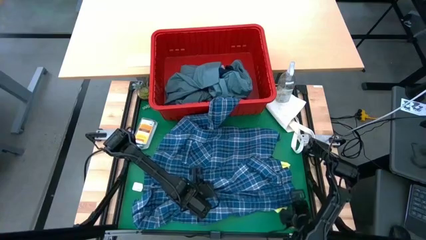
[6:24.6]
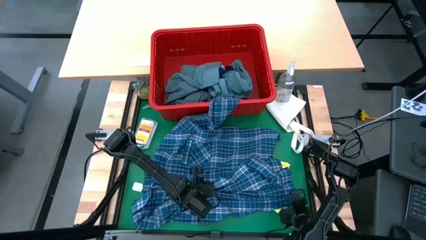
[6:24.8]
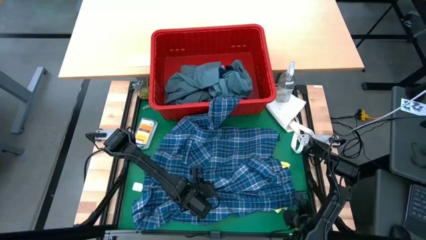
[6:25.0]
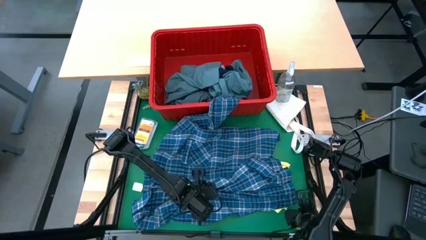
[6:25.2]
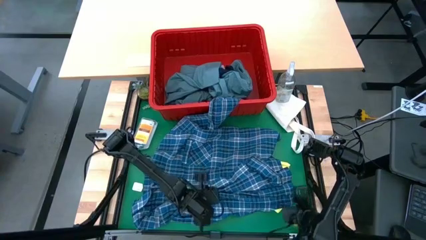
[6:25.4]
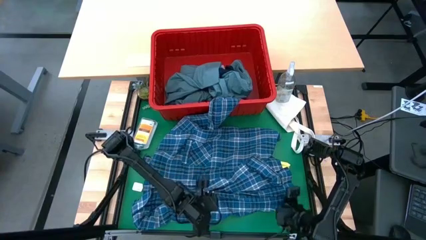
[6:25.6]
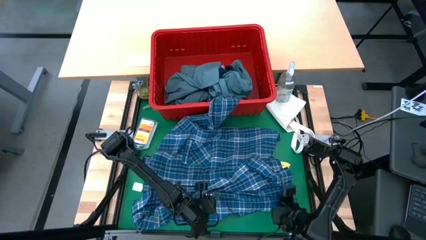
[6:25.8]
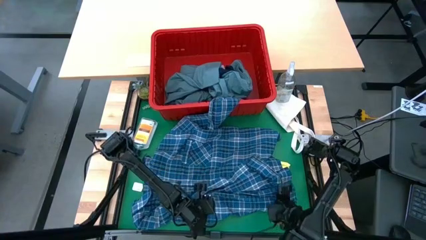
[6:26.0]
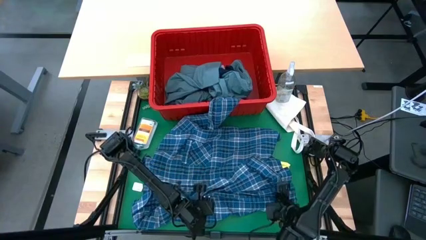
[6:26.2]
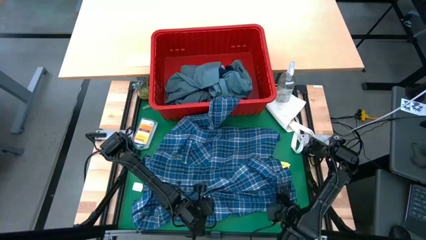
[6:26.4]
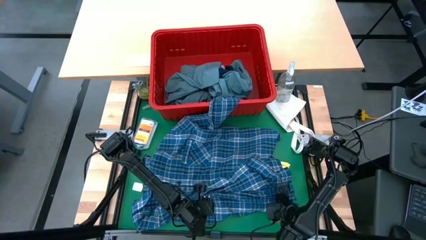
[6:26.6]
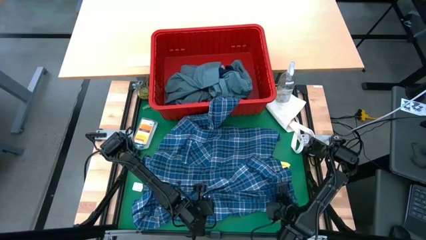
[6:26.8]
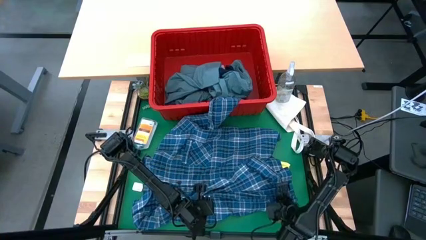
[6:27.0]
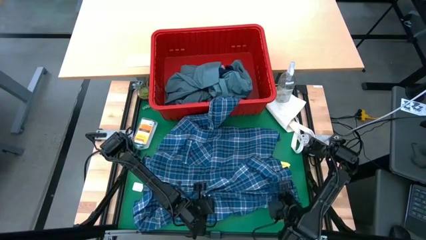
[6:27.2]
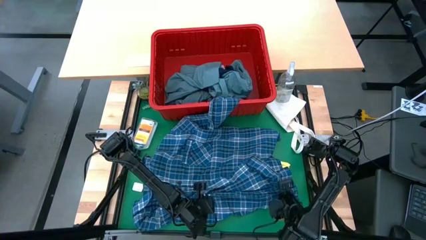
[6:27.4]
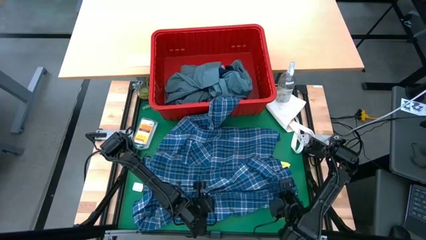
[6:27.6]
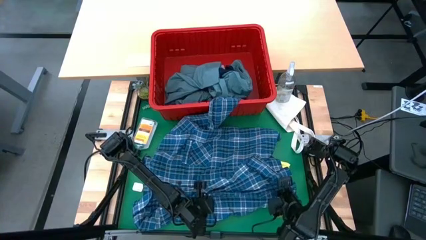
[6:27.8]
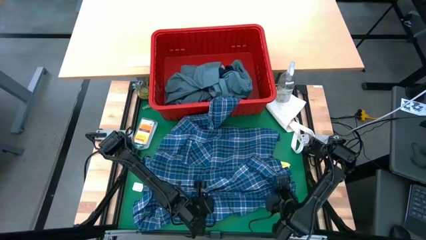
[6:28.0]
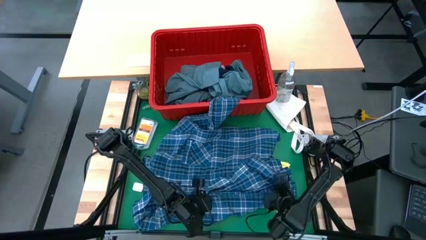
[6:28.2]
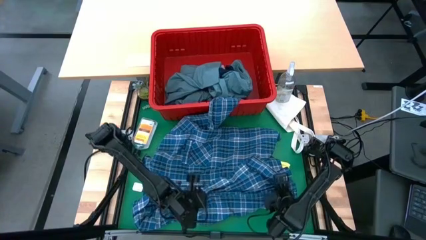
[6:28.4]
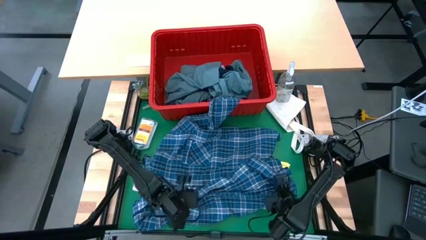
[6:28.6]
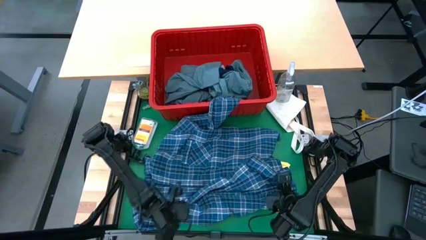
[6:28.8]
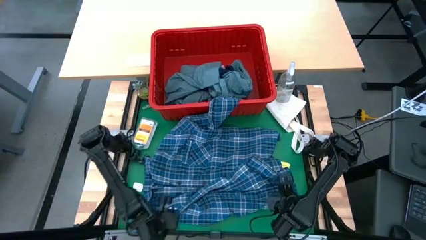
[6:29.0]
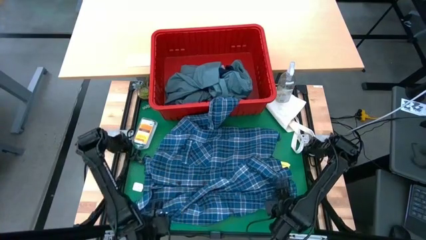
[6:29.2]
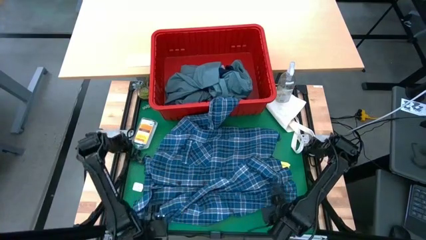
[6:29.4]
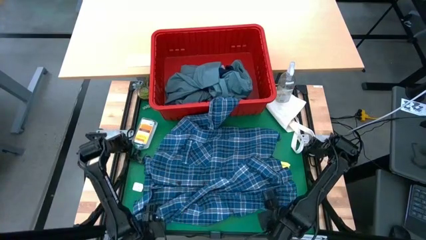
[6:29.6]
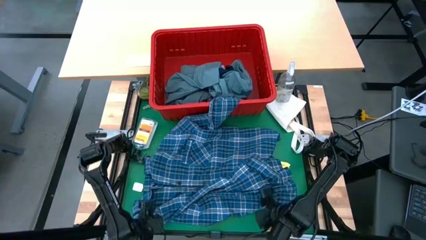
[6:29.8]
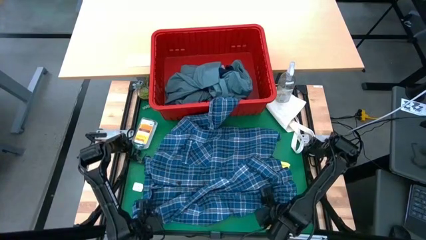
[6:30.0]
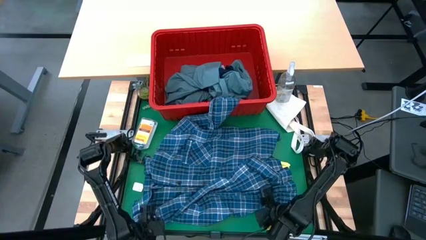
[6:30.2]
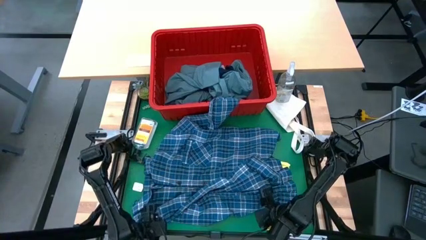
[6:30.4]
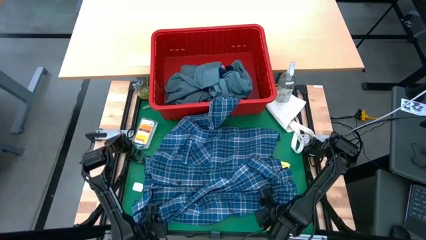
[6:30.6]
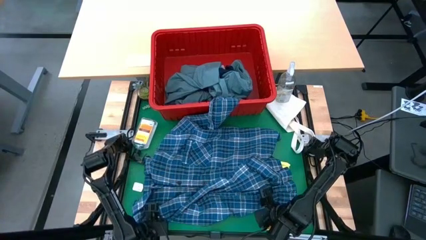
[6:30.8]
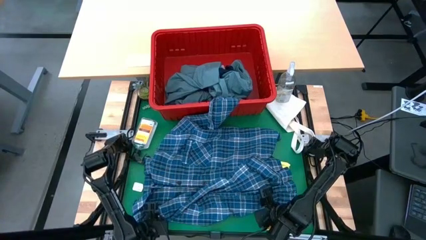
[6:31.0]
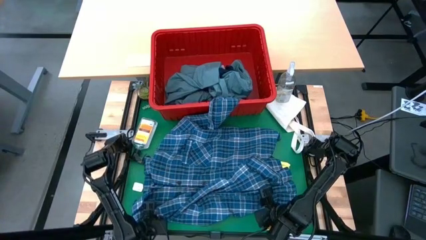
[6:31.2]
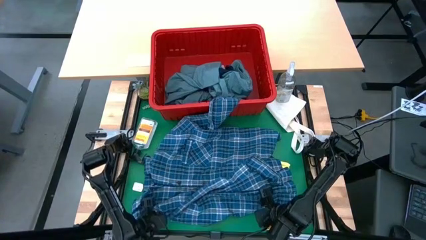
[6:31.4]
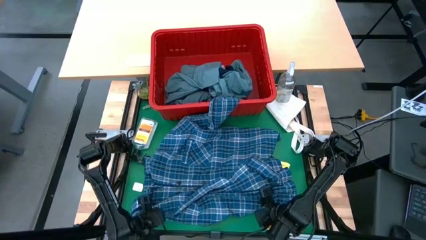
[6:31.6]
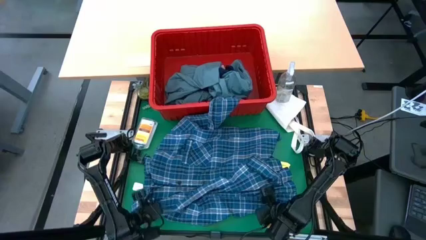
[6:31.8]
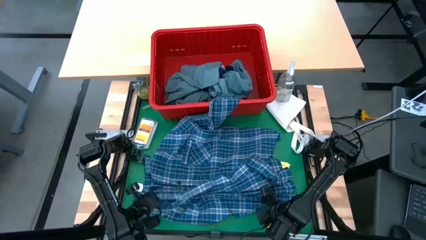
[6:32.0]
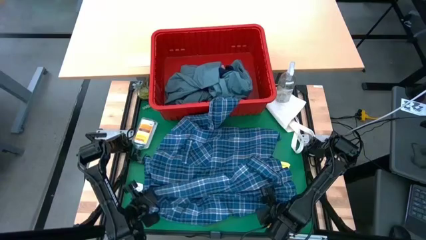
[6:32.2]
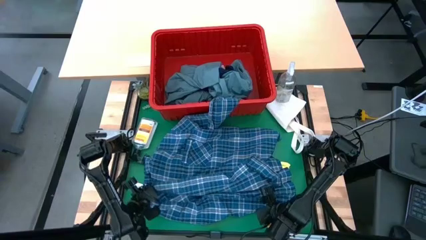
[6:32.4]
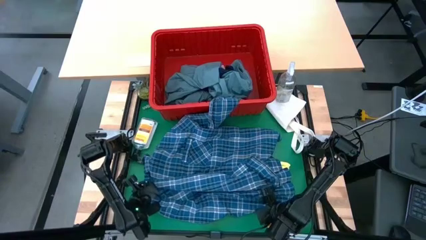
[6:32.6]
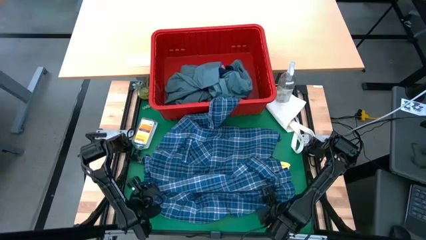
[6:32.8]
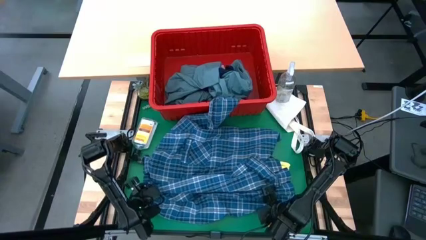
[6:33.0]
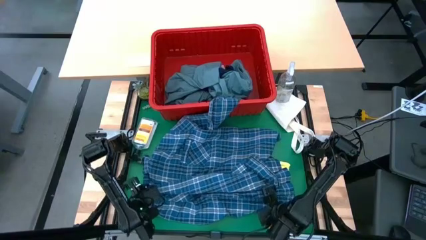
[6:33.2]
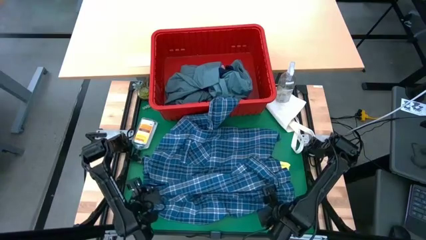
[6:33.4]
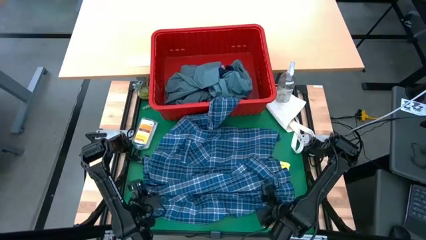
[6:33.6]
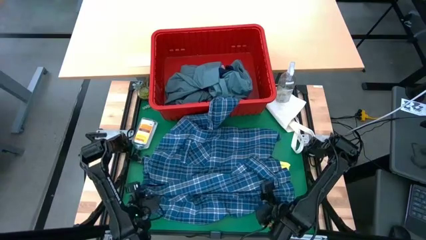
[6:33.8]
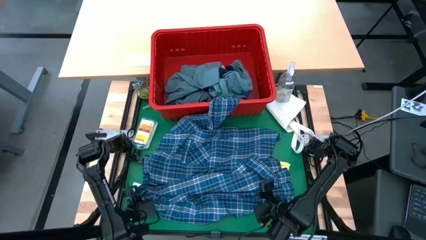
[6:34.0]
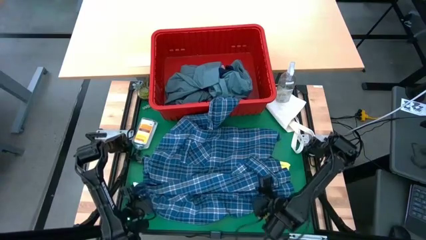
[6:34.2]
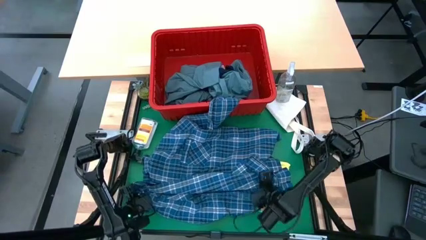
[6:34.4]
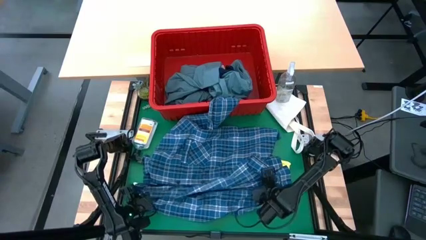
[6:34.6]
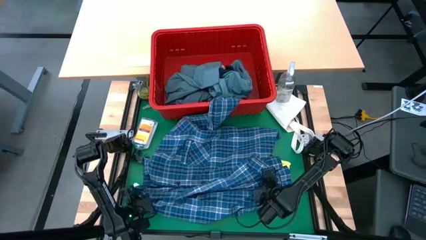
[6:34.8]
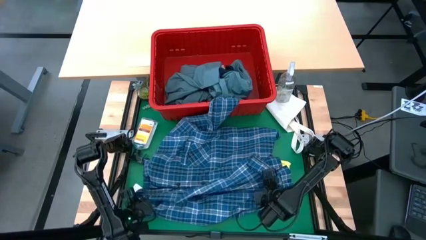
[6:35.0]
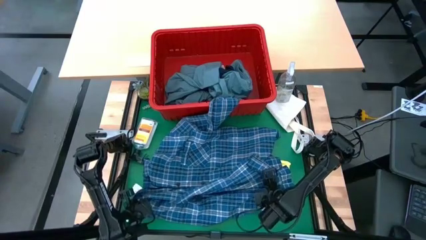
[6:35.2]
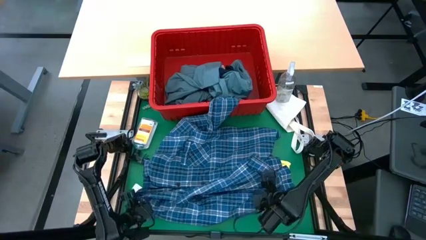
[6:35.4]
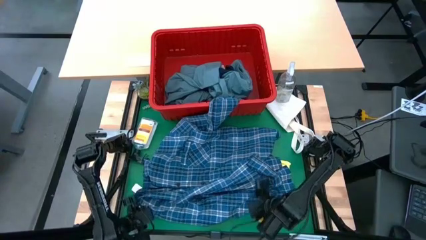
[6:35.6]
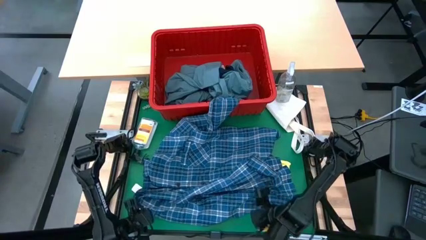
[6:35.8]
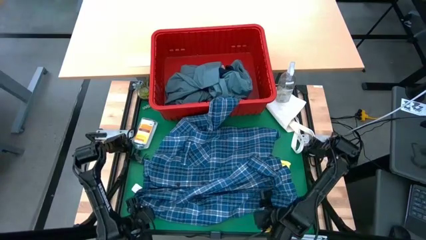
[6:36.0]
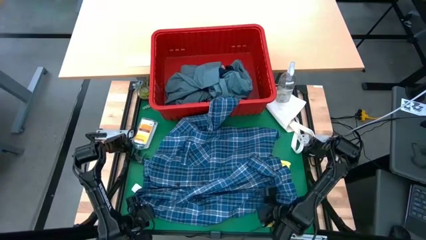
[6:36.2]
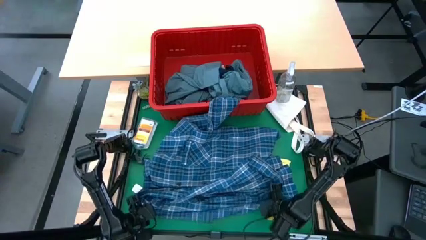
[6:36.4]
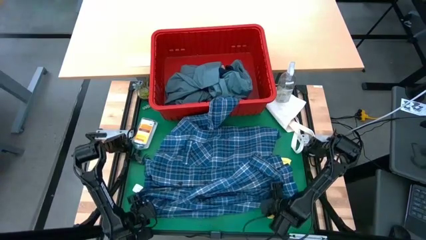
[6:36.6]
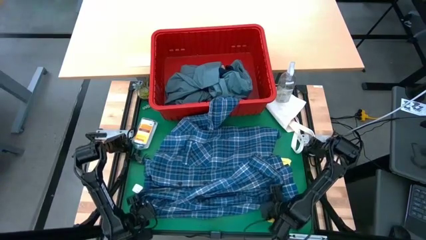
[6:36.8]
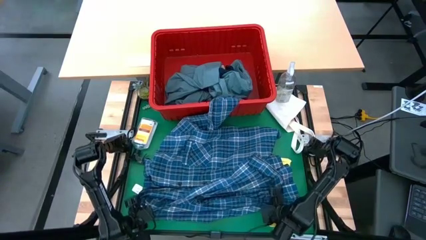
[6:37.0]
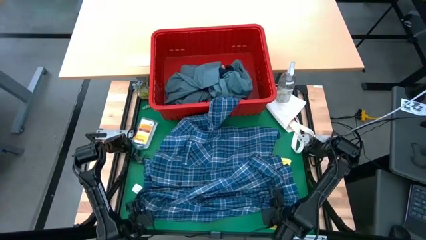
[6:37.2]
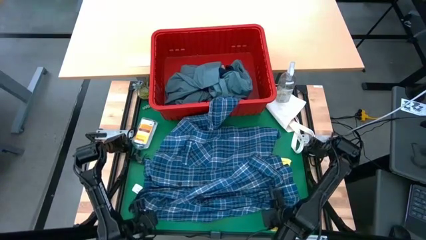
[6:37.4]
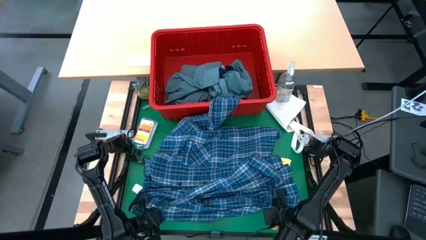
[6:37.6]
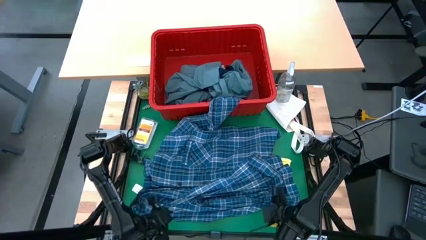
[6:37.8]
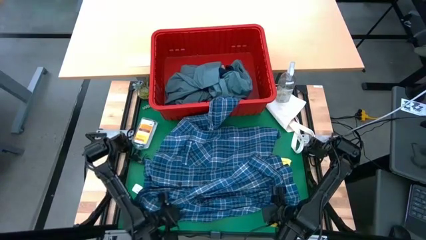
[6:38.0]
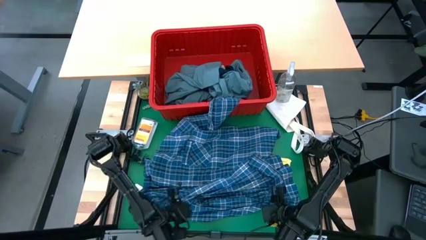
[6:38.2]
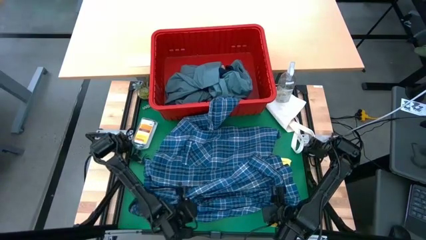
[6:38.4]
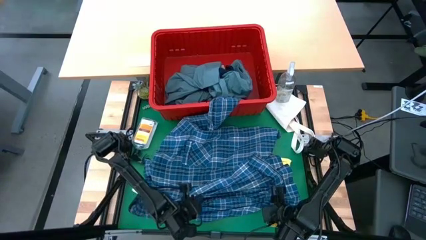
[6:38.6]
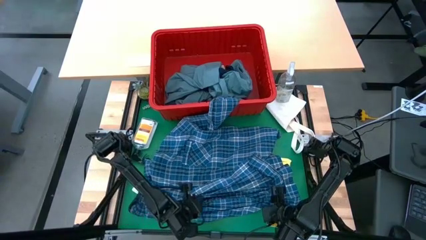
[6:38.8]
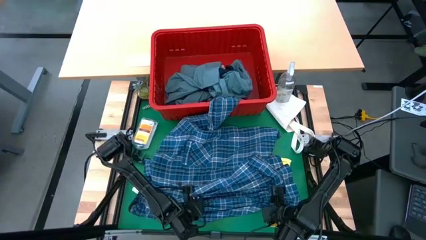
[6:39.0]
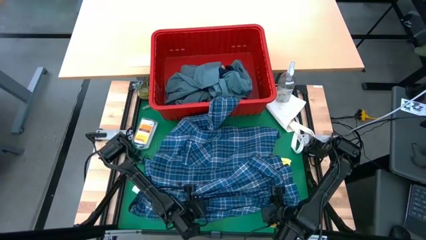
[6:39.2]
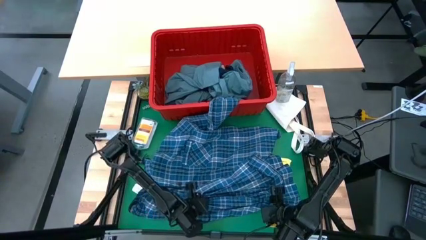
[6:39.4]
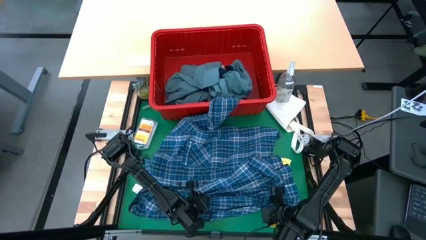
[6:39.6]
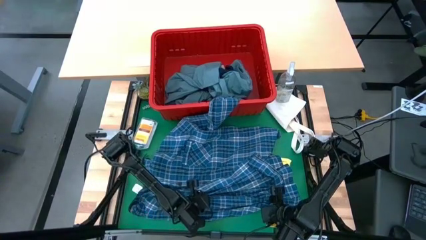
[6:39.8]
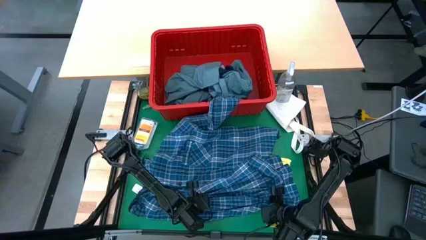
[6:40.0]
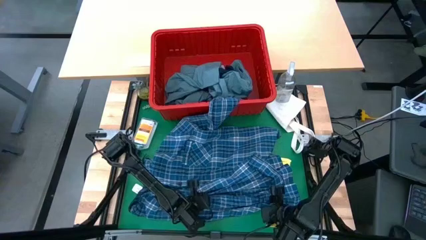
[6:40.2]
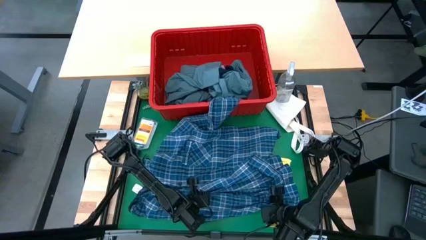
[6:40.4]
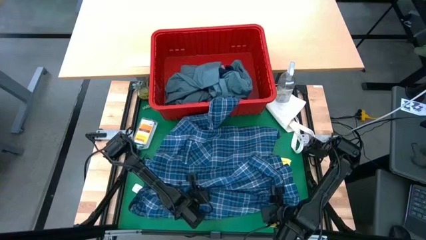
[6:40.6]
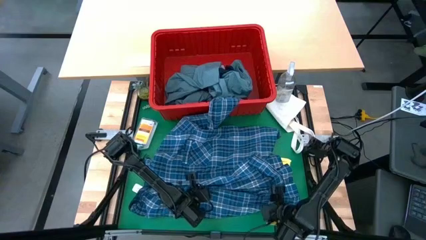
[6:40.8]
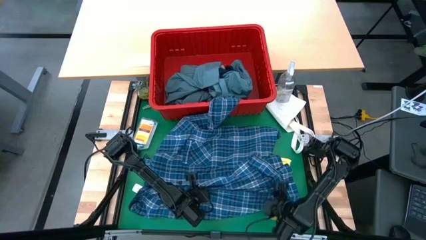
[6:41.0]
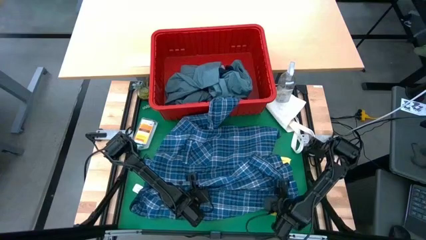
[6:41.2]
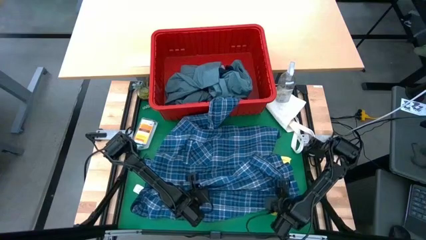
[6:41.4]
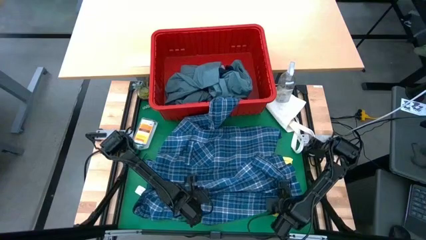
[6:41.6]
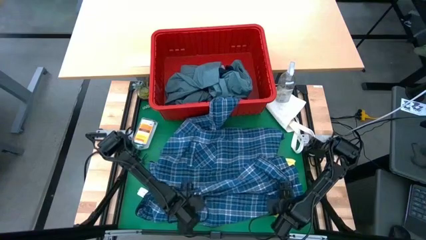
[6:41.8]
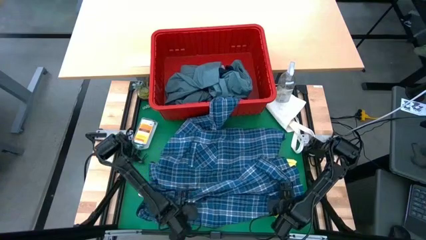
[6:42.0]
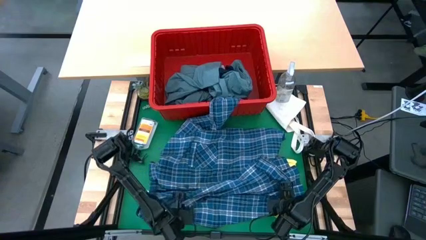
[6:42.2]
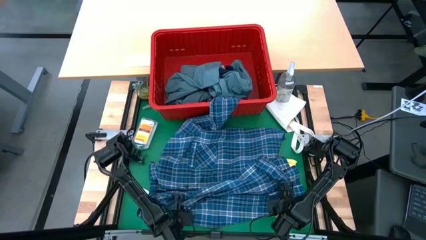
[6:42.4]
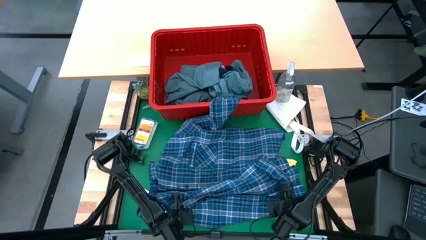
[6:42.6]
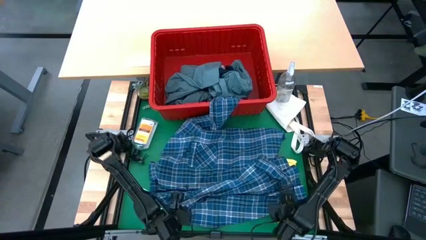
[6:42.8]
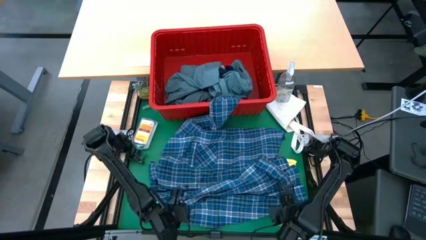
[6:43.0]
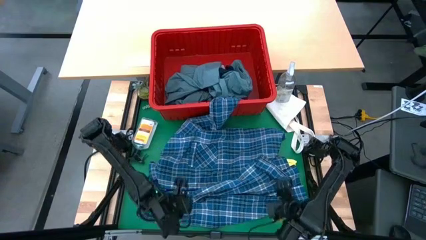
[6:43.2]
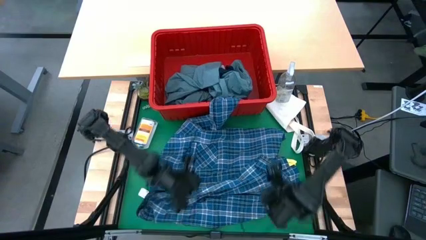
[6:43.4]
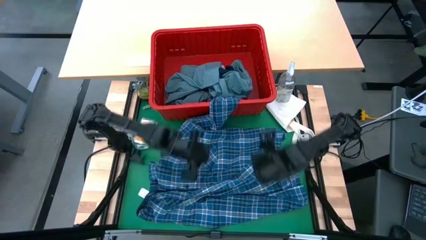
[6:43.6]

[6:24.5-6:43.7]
Task: Fold Laundry from Bin
Fold the blue shirt
